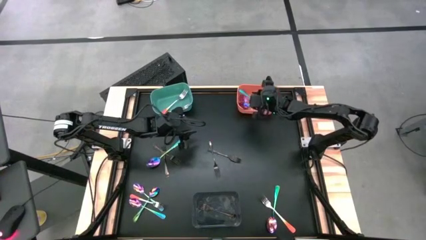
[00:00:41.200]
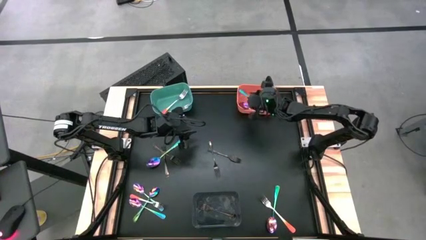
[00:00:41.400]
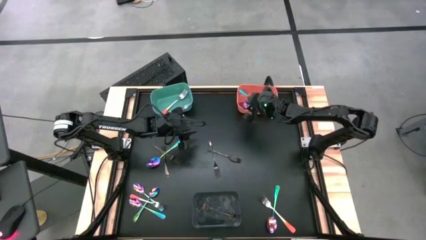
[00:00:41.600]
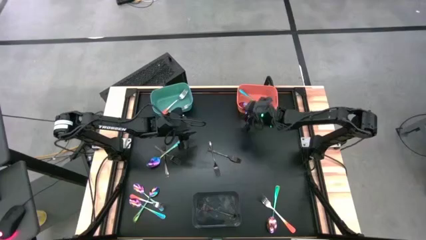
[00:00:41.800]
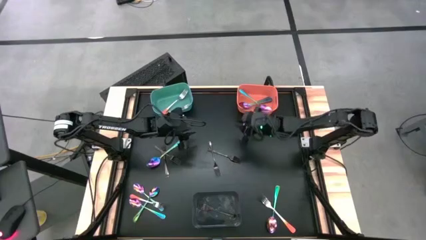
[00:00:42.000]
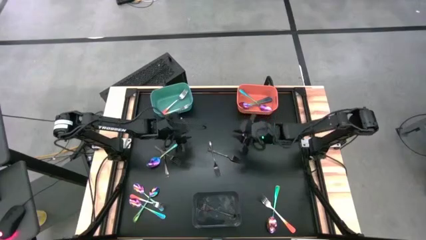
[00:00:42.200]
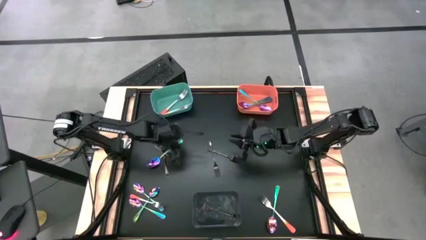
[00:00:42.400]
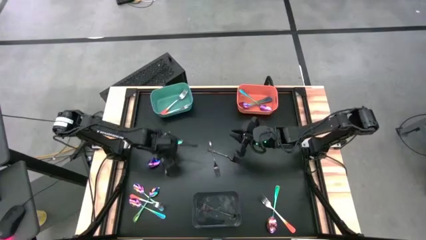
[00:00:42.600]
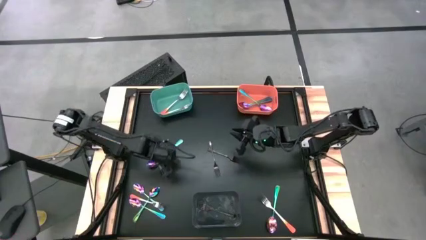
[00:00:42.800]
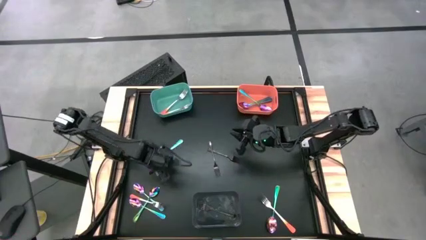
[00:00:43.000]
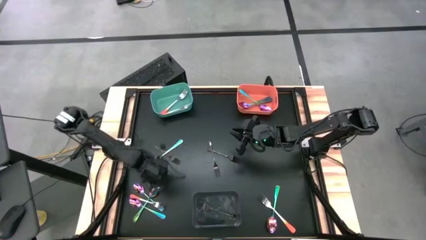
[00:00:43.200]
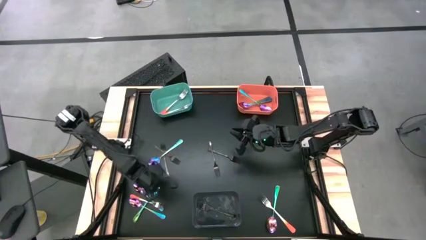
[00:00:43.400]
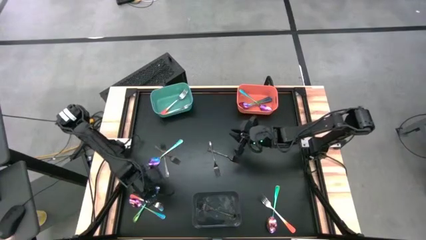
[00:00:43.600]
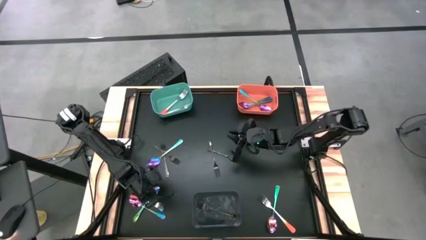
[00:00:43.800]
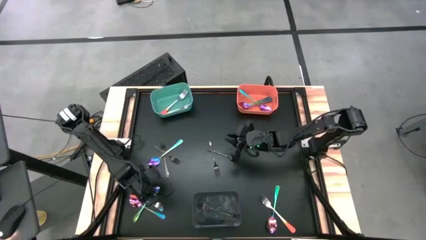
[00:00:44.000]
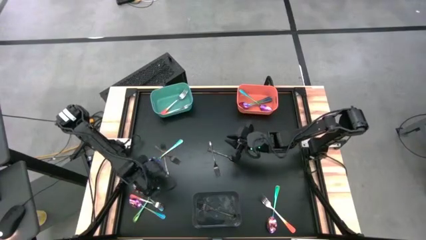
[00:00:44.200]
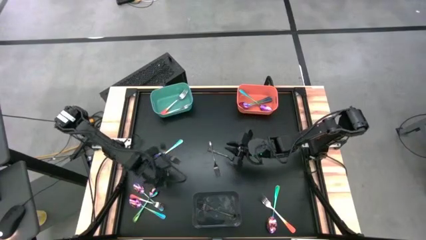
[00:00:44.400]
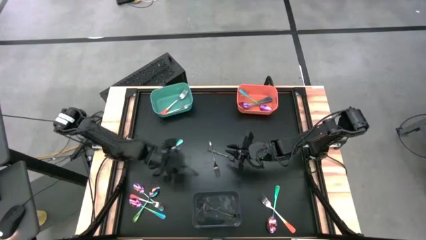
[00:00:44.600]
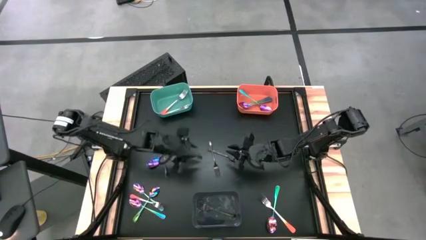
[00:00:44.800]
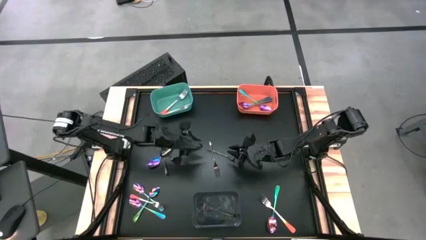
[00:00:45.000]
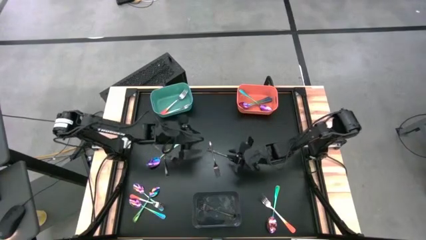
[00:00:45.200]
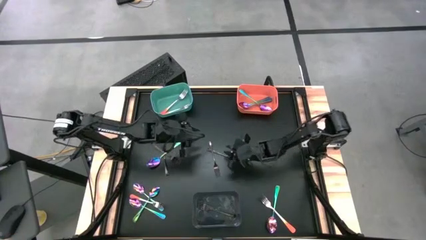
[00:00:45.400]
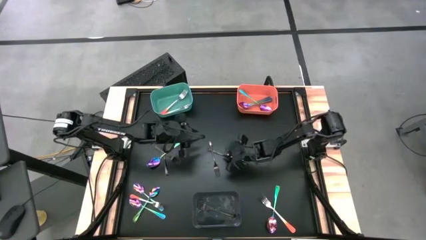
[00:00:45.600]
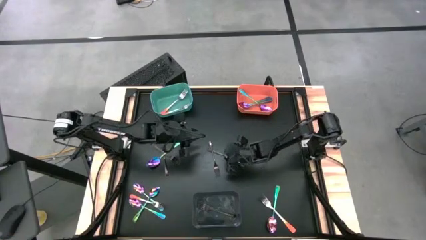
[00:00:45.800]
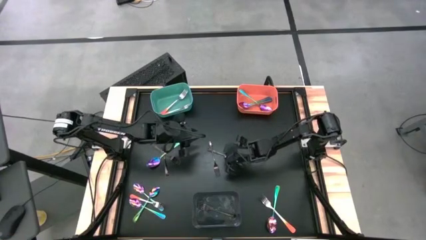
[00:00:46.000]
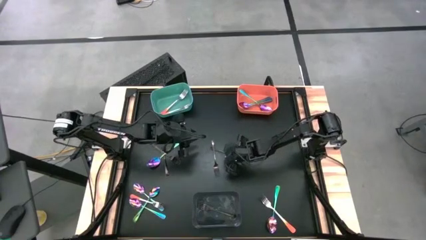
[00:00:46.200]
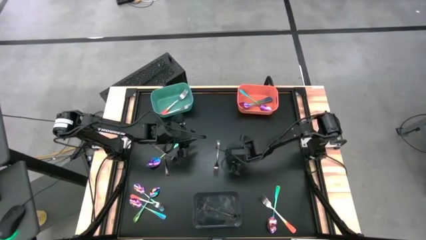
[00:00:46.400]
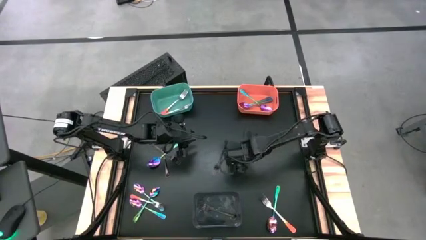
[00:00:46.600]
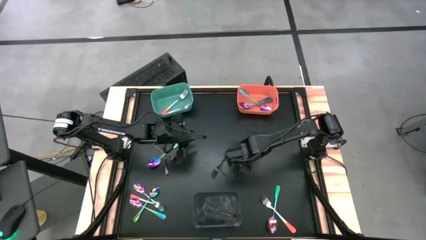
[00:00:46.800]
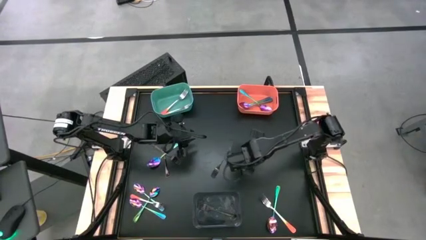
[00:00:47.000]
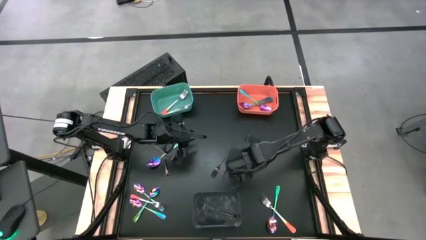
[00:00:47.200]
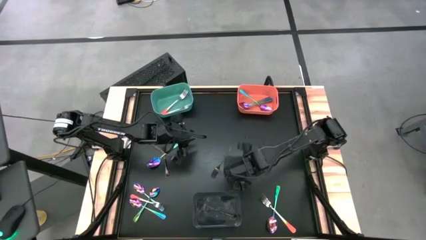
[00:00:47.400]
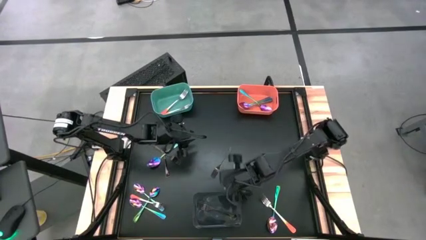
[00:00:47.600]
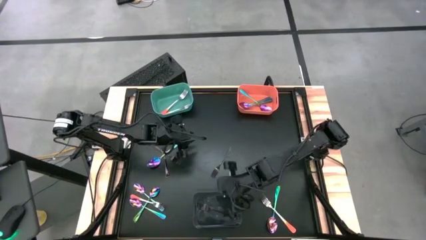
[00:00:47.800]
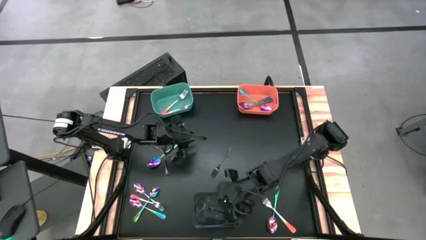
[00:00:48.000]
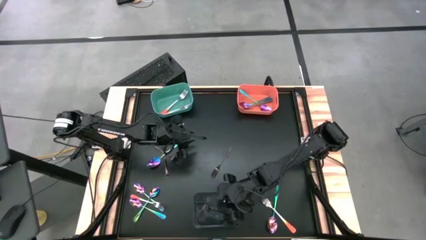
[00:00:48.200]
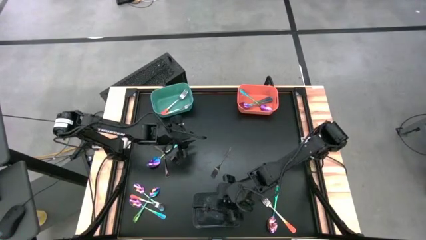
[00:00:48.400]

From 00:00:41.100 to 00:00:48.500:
Task: Sort silverware by color (type)
Put the black fork into the black bin

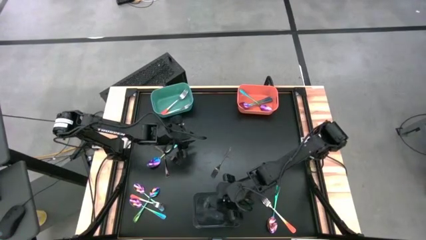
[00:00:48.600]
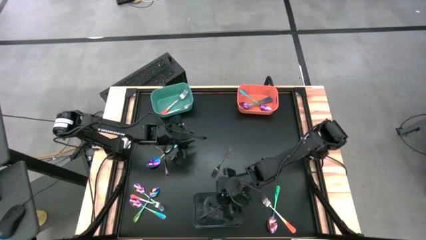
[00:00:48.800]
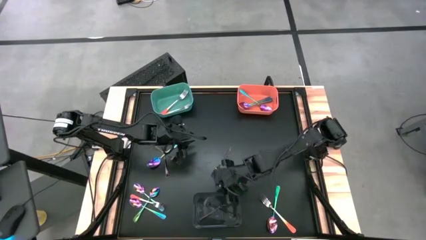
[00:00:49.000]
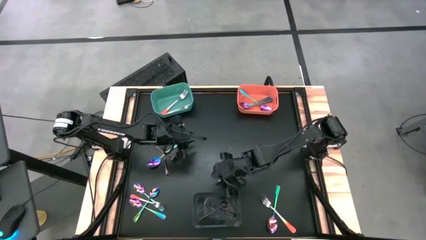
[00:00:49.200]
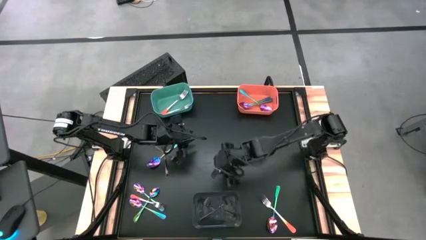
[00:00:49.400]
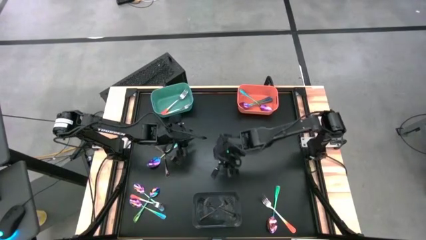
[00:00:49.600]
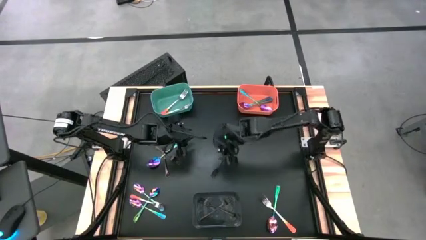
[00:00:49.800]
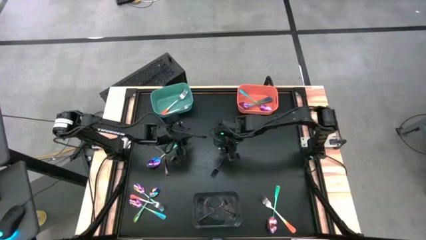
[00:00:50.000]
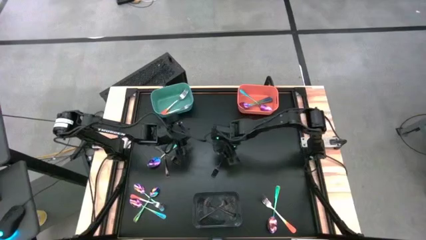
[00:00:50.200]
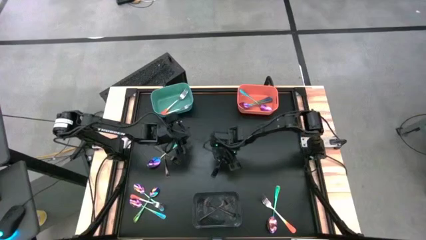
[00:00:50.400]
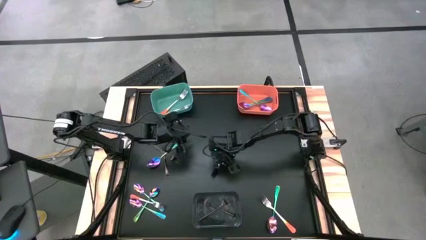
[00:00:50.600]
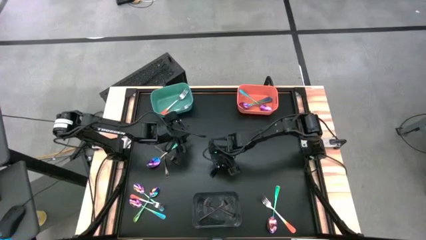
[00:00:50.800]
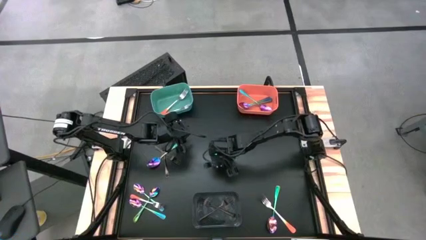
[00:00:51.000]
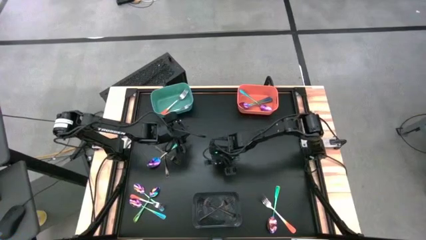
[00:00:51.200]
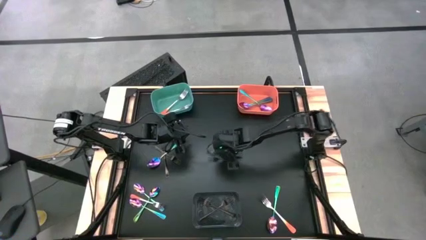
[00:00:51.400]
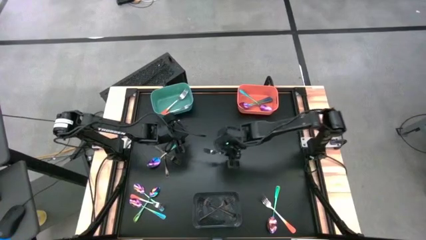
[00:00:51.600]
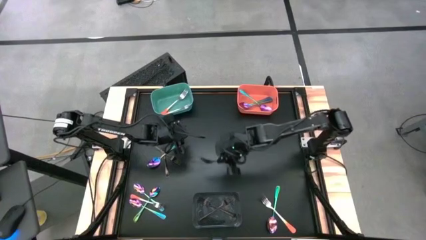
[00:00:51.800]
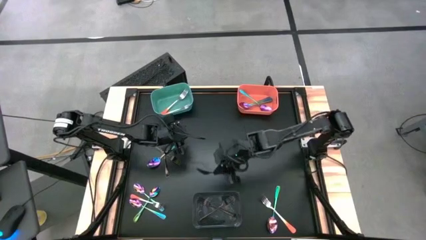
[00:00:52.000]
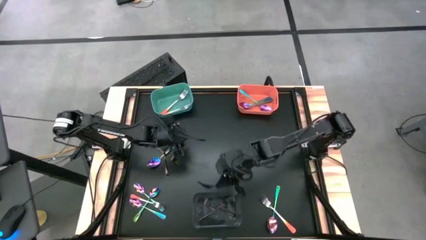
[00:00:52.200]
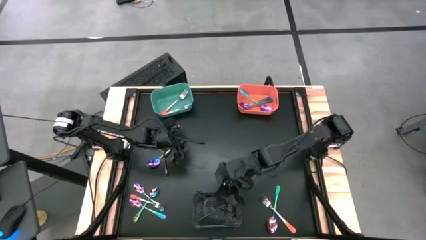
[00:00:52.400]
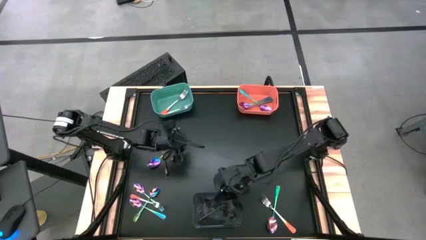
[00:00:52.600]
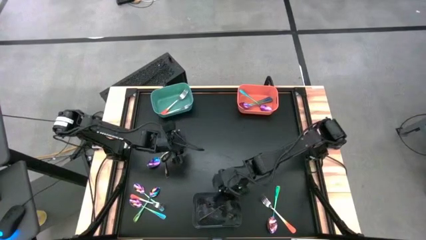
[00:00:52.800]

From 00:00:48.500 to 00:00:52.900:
Put the black fork into the black bin

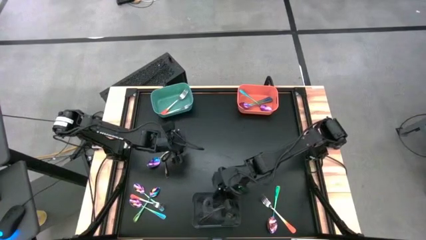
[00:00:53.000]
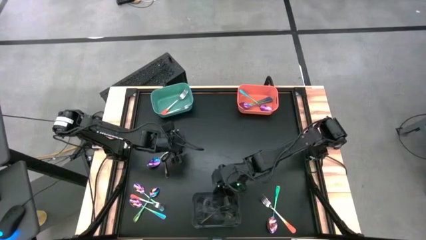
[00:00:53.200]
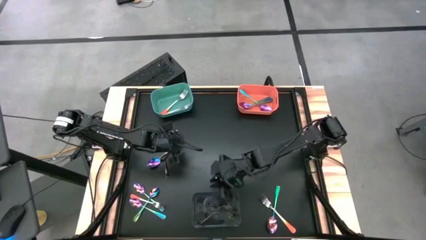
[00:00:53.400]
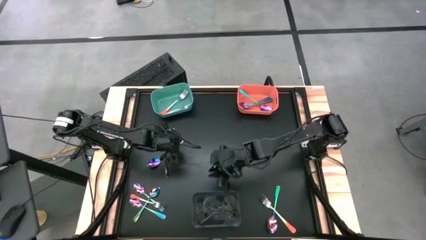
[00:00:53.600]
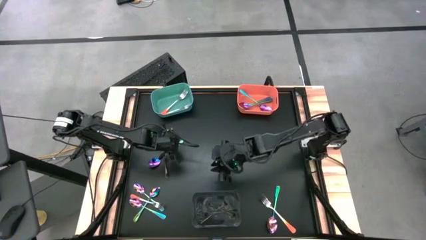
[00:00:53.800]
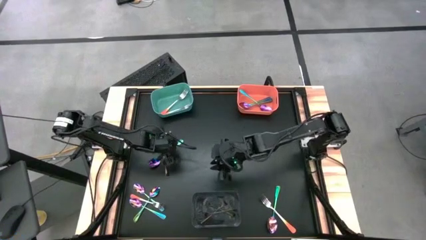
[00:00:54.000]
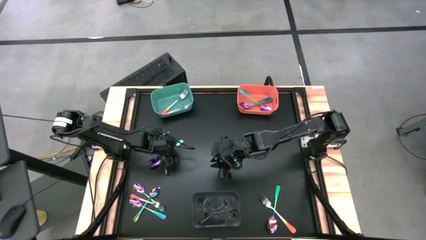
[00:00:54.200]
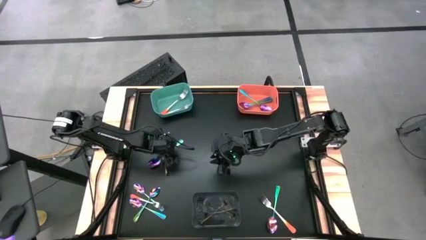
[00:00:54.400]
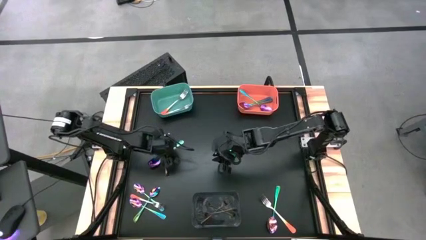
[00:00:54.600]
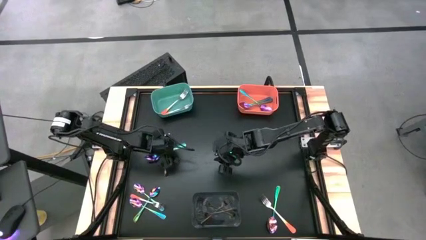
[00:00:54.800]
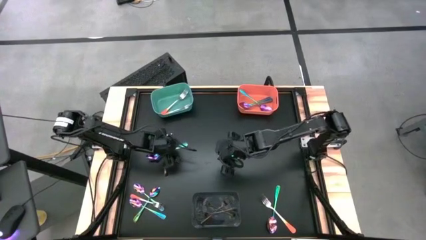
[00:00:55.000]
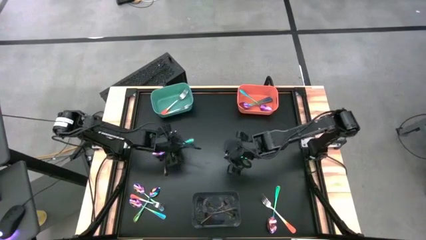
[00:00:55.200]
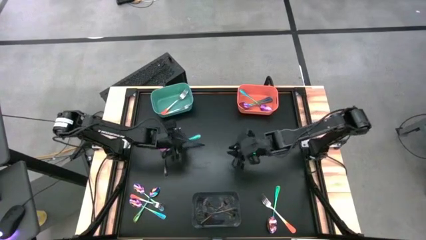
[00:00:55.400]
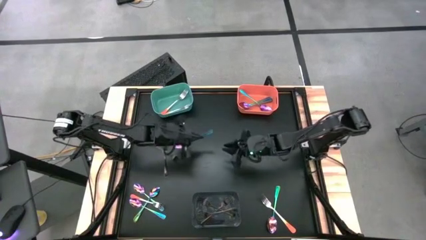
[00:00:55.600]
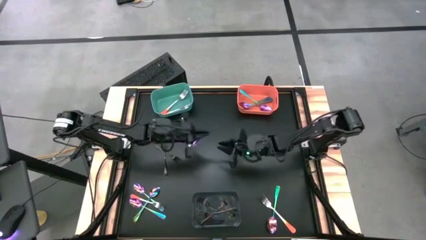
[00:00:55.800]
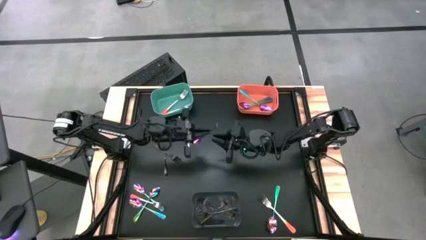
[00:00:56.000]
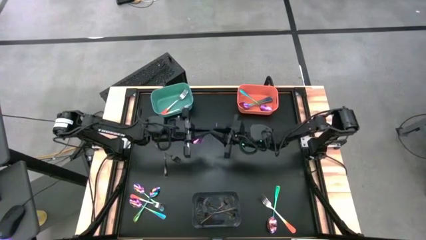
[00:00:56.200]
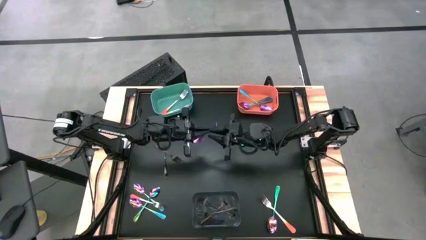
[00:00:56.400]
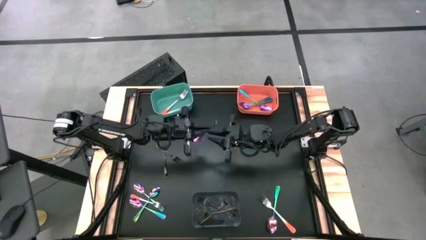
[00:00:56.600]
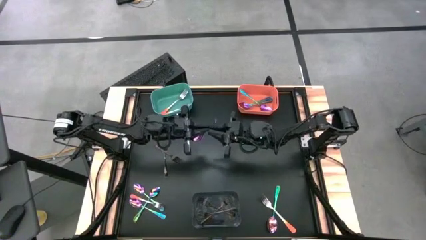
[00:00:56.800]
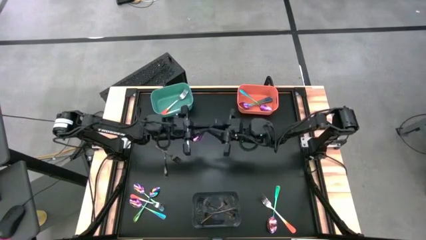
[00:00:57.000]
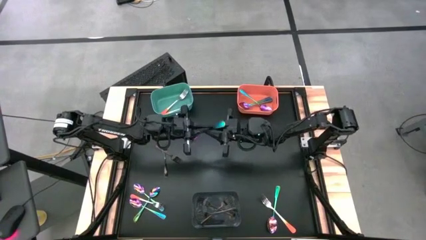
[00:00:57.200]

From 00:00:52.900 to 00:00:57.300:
Put the blue spoon into the orange bin
